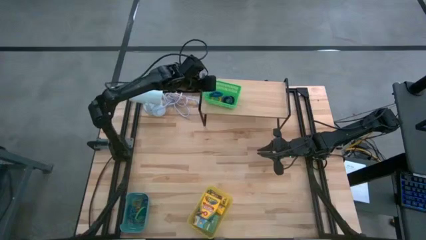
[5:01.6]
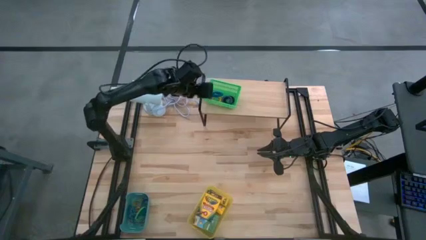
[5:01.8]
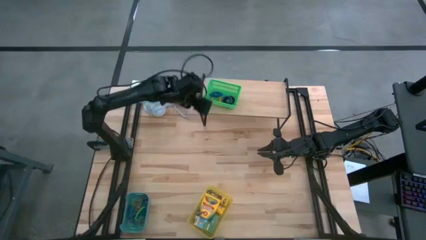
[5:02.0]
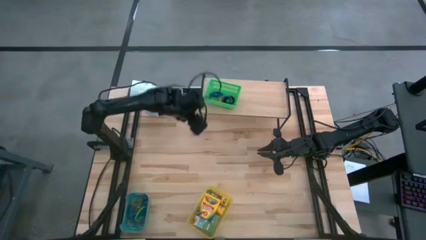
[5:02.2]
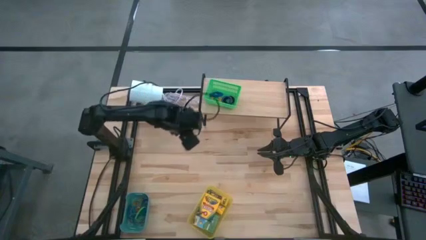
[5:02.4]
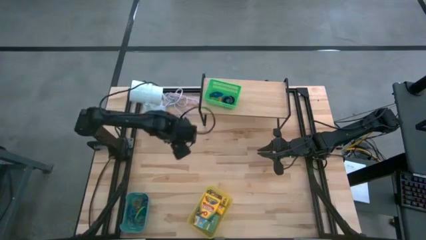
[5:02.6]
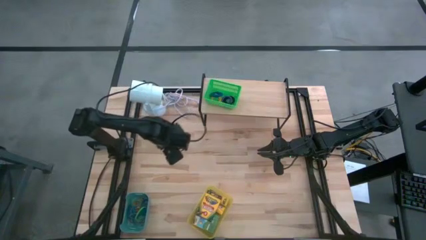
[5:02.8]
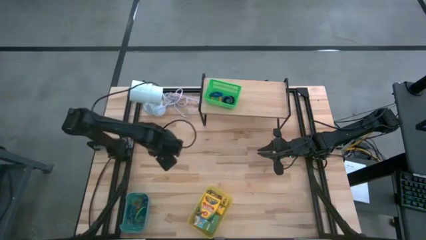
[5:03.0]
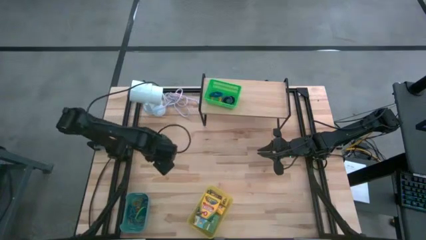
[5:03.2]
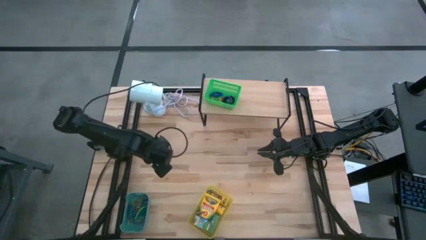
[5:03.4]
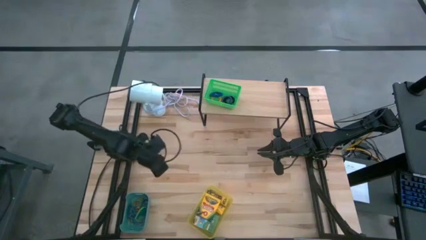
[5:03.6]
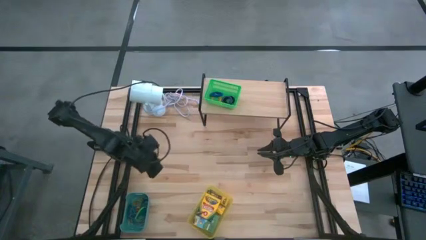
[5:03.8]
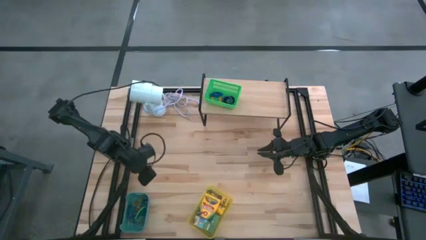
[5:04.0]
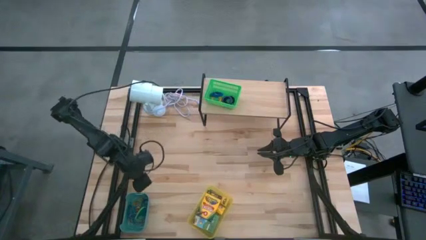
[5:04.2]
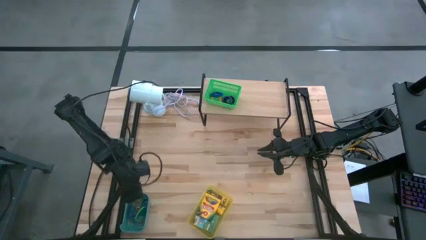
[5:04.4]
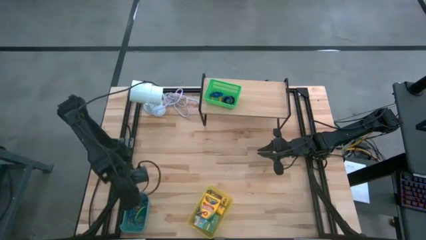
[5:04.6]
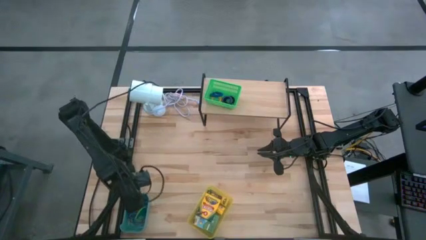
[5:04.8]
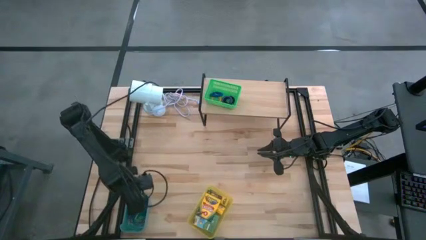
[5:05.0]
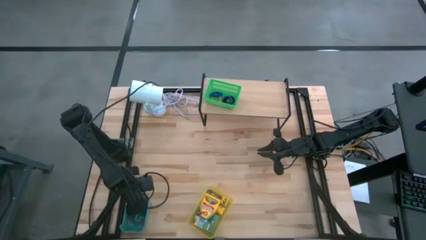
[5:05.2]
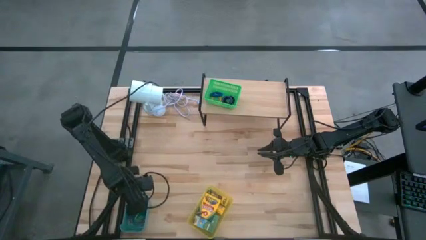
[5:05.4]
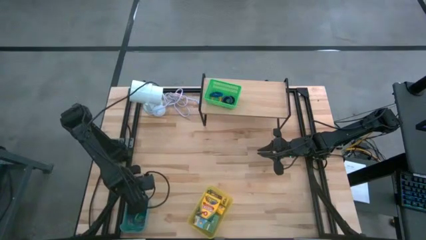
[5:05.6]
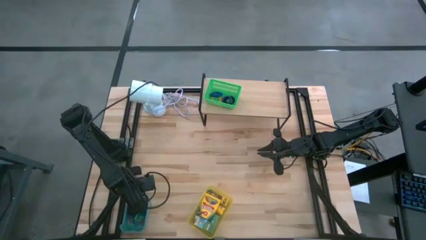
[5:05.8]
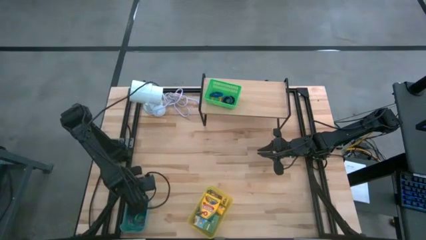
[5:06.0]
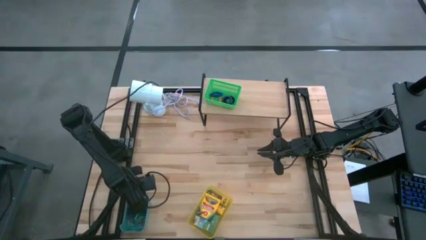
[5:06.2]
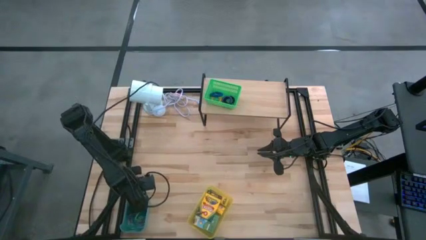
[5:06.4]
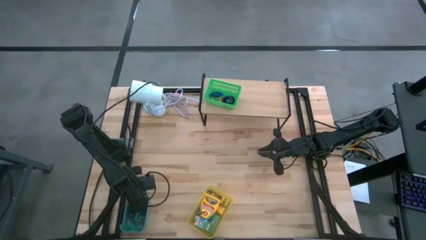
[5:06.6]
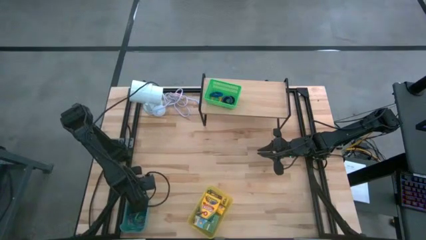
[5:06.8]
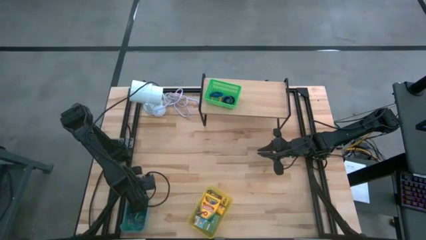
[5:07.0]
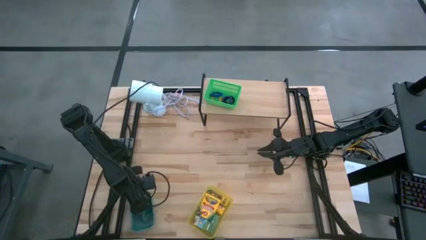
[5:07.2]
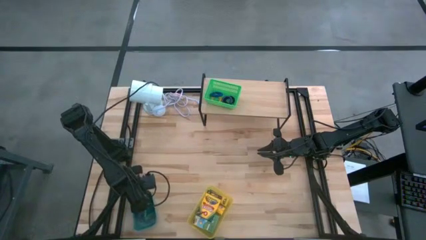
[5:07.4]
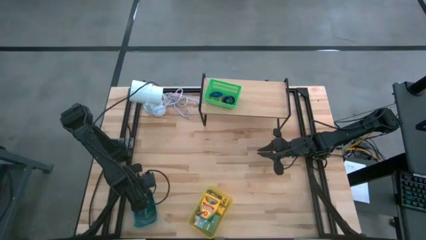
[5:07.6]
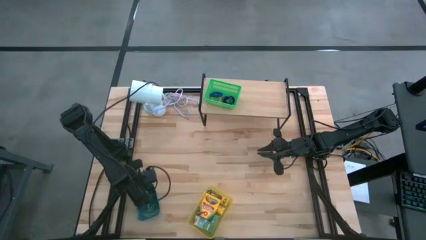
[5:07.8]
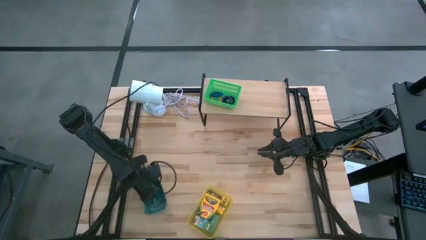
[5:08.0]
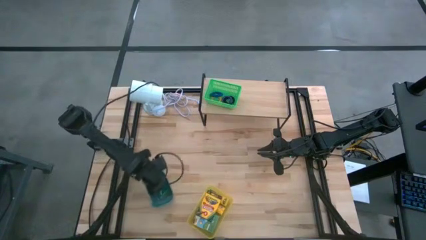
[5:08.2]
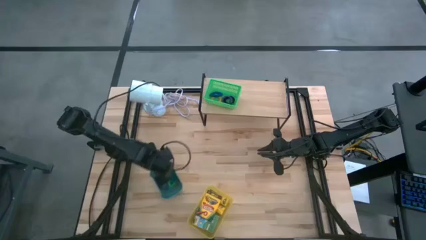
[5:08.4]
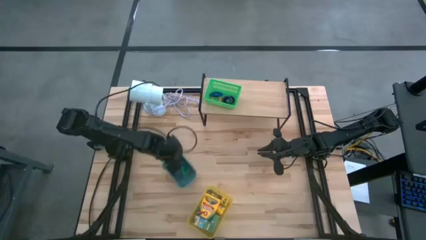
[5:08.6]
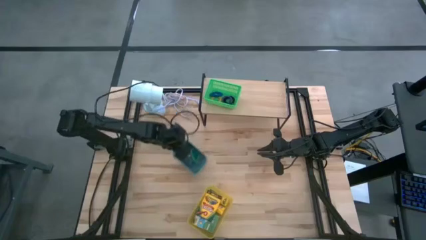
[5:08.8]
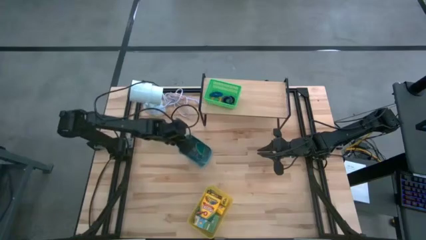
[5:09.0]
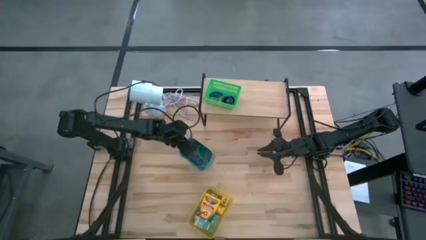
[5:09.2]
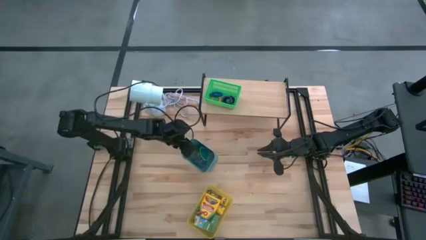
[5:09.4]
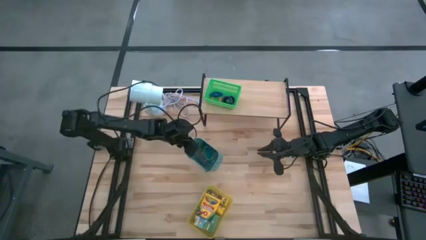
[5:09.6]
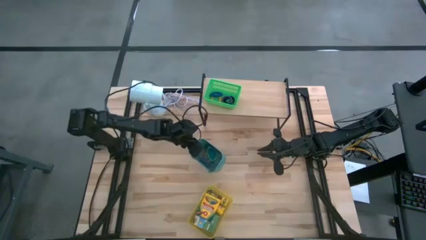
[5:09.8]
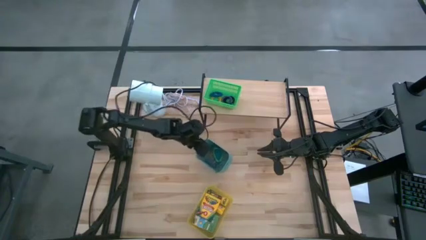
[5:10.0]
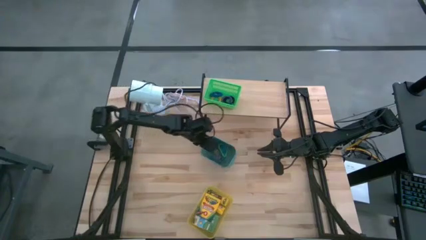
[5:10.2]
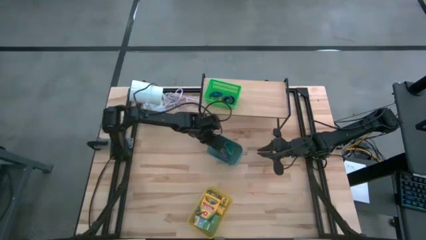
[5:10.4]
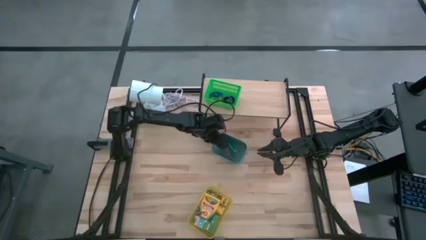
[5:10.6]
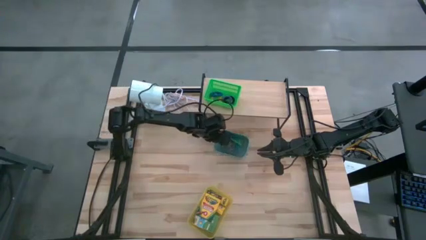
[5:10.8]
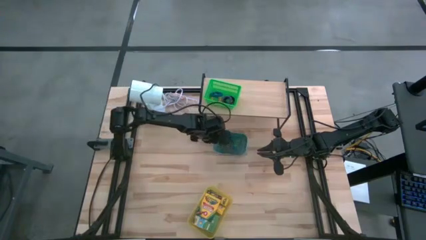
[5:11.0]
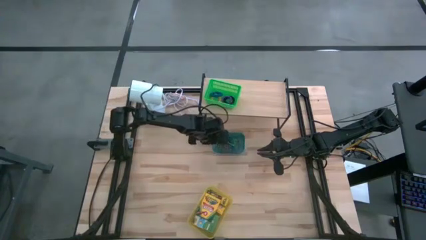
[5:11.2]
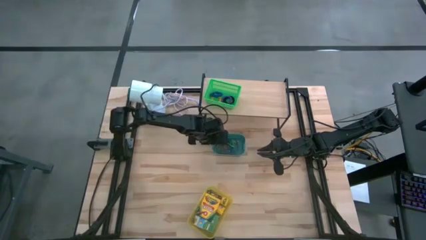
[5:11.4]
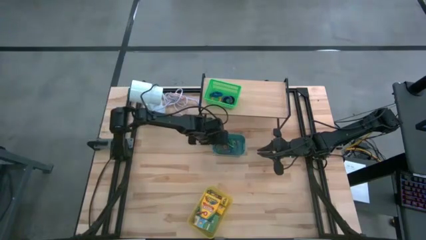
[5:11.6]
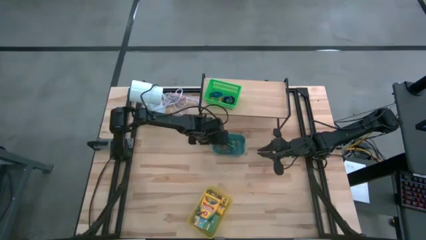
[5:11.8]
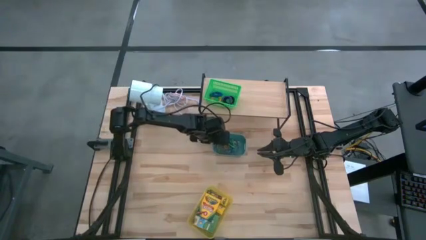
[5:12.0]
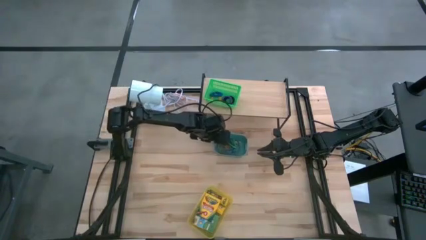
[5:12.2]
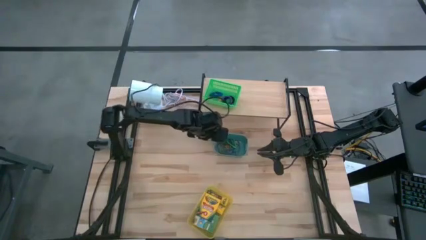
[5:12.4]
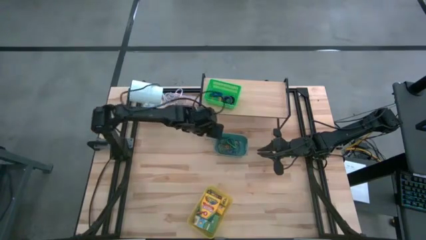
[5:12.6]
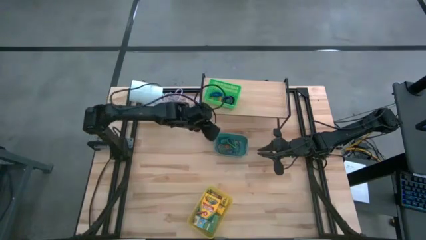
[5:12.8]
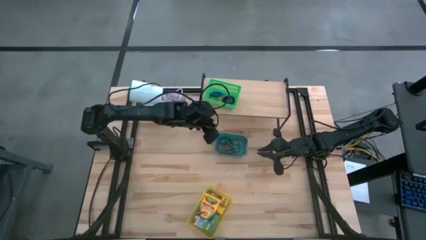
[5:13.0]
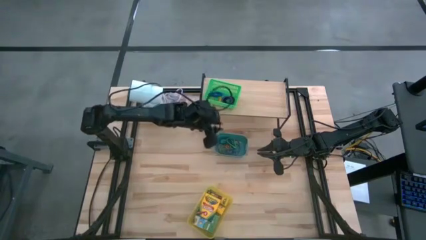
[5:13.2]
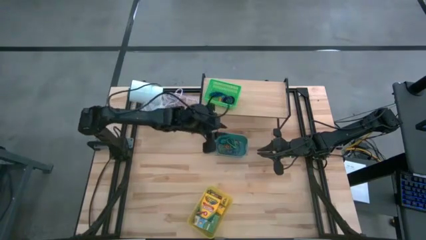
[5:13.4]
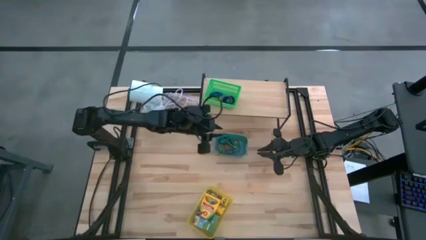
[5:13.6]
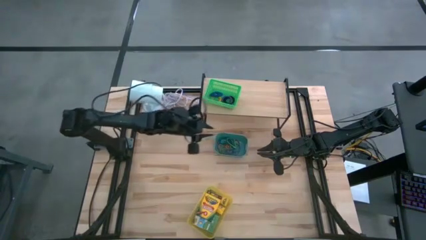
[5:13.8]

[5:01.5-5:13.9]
Task: Pick & Place Office Desk Supplies
Put the blue bin on the shelf
